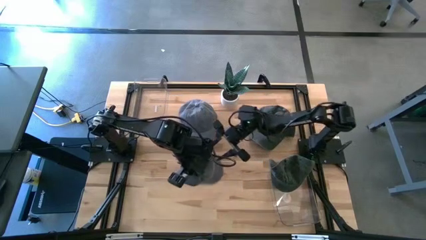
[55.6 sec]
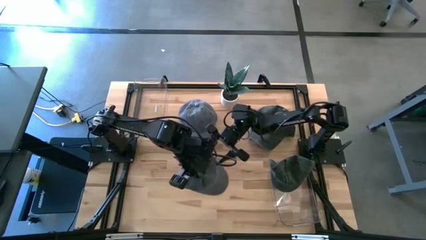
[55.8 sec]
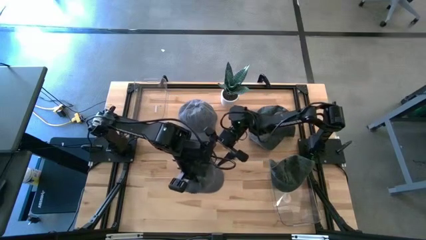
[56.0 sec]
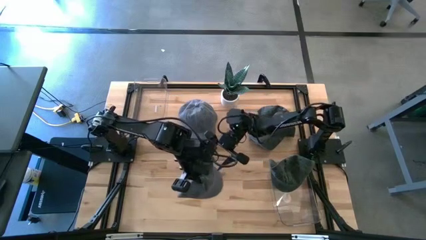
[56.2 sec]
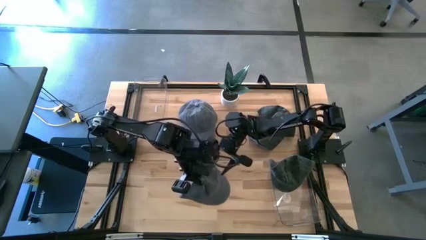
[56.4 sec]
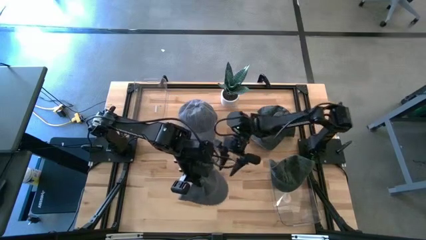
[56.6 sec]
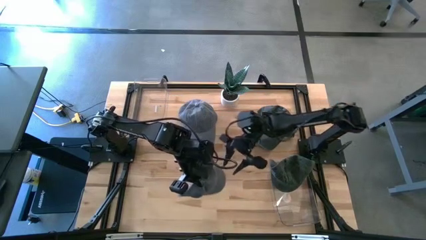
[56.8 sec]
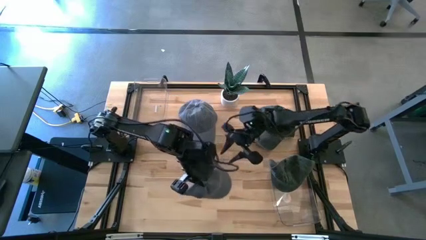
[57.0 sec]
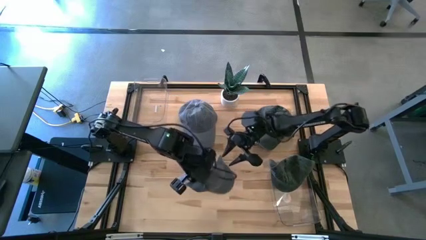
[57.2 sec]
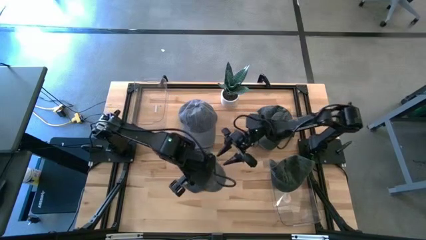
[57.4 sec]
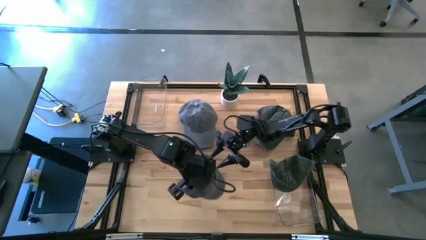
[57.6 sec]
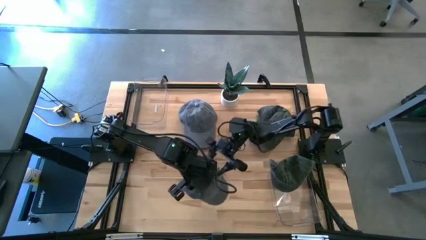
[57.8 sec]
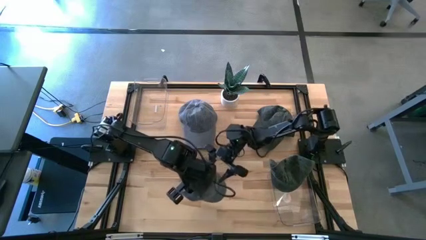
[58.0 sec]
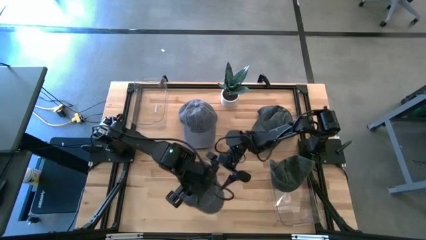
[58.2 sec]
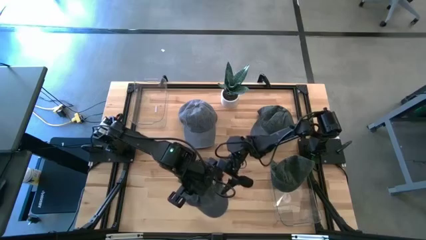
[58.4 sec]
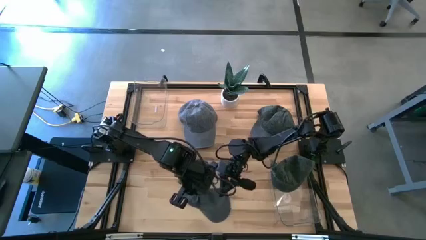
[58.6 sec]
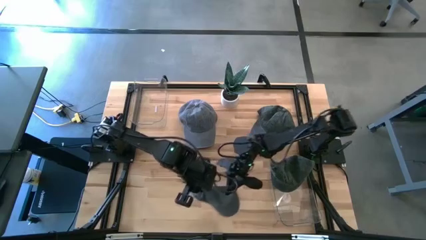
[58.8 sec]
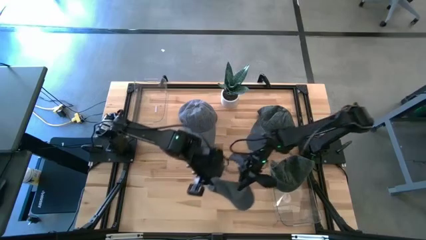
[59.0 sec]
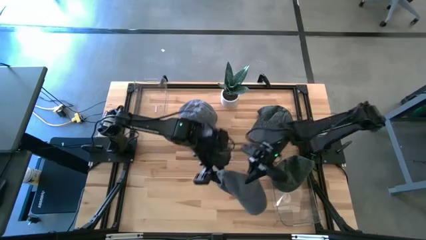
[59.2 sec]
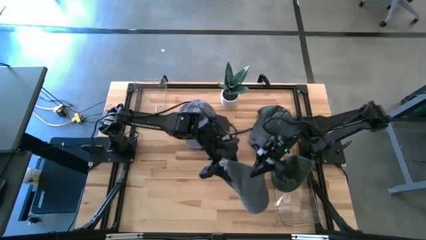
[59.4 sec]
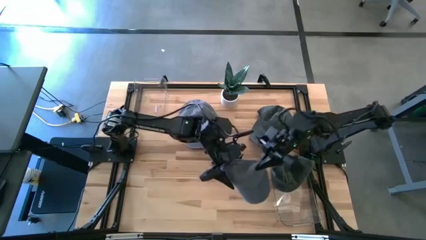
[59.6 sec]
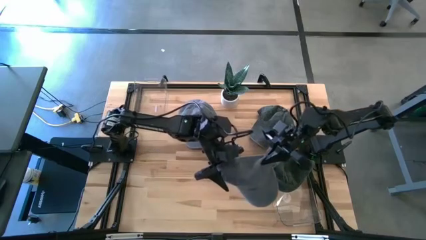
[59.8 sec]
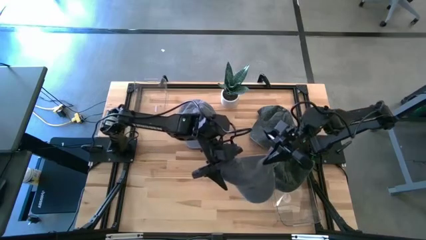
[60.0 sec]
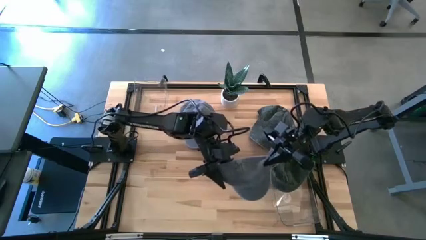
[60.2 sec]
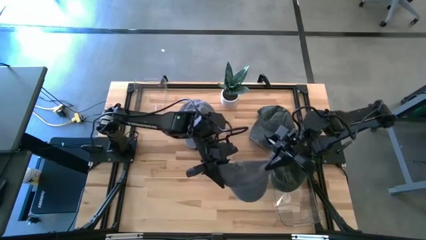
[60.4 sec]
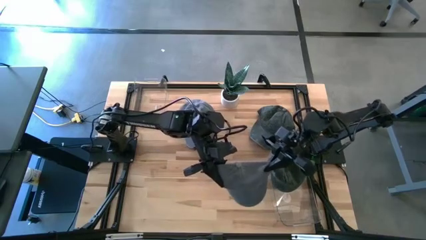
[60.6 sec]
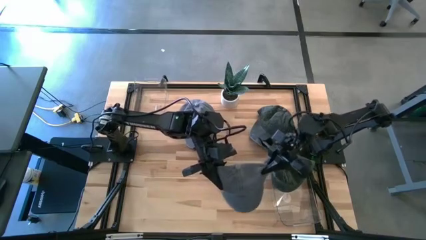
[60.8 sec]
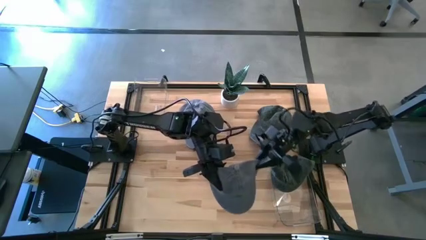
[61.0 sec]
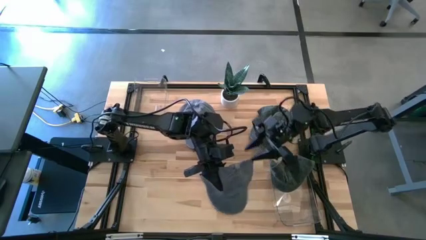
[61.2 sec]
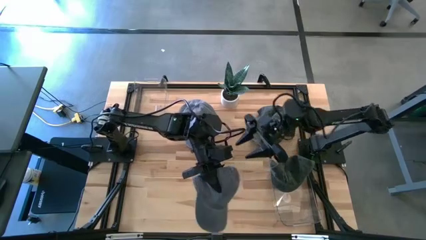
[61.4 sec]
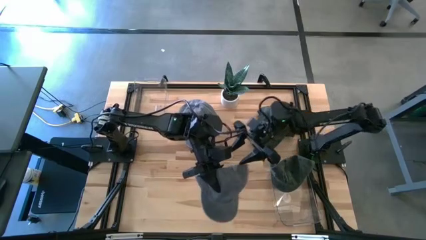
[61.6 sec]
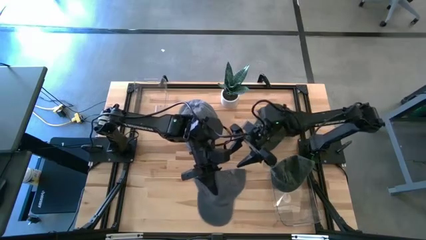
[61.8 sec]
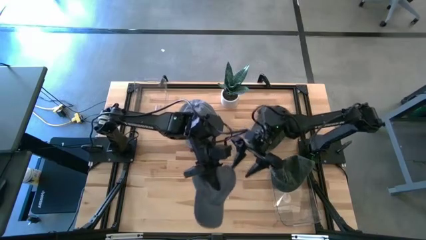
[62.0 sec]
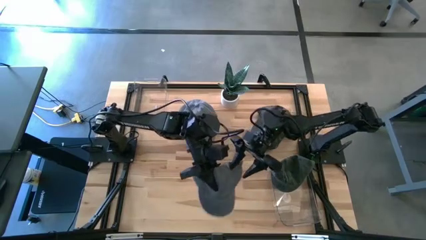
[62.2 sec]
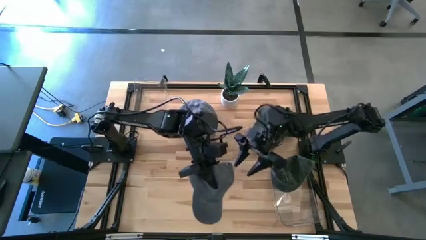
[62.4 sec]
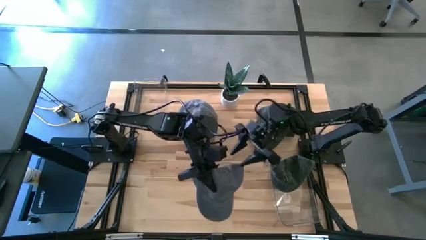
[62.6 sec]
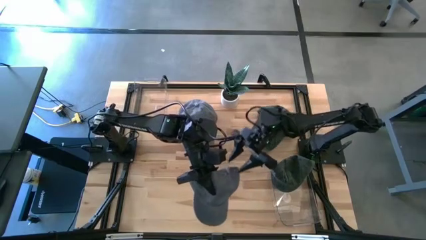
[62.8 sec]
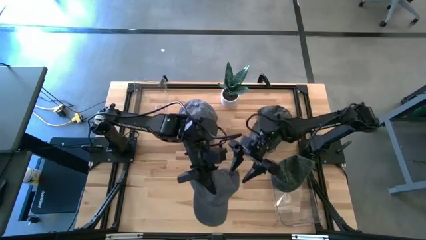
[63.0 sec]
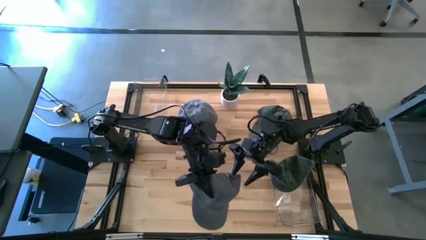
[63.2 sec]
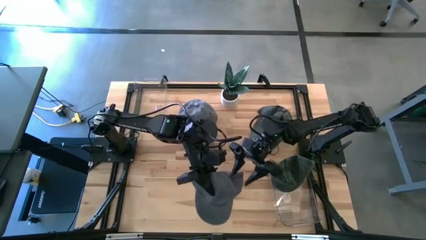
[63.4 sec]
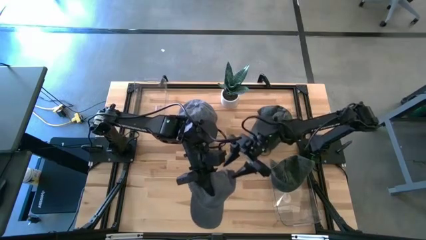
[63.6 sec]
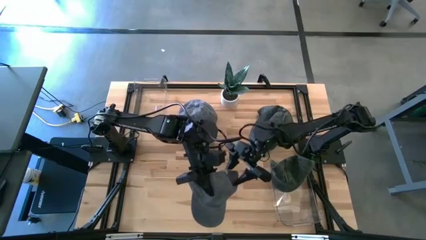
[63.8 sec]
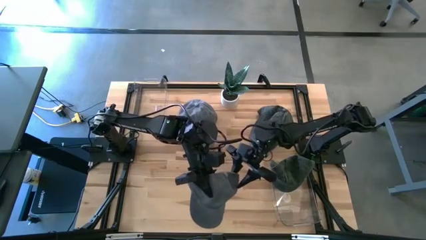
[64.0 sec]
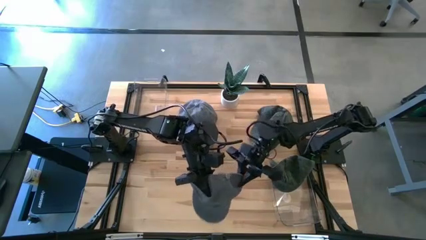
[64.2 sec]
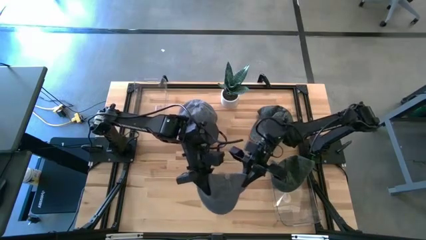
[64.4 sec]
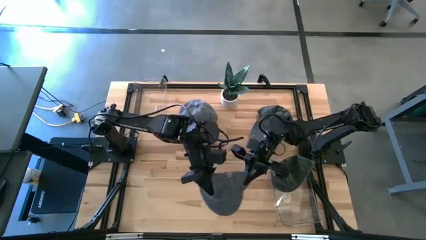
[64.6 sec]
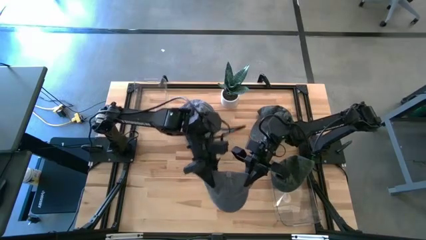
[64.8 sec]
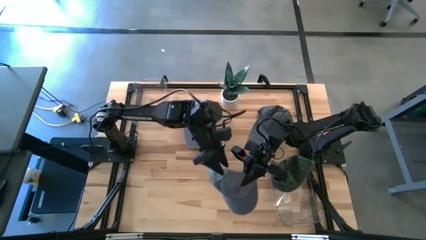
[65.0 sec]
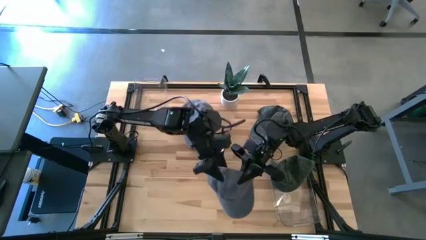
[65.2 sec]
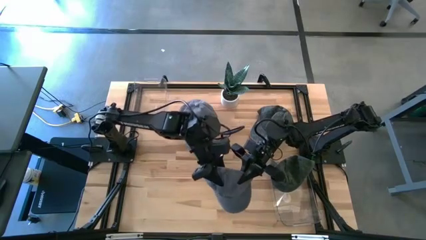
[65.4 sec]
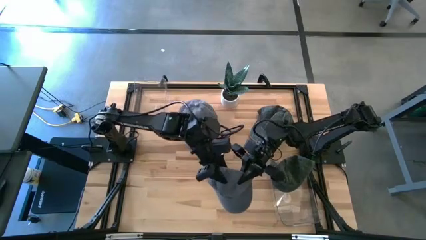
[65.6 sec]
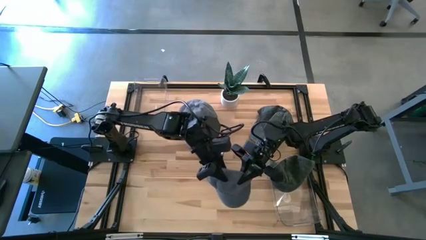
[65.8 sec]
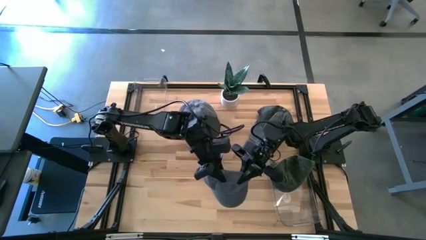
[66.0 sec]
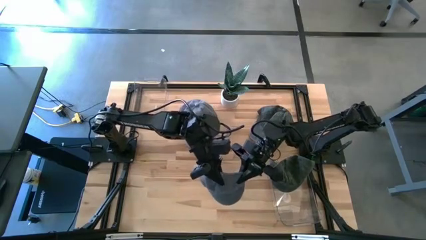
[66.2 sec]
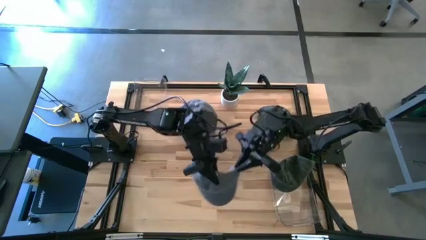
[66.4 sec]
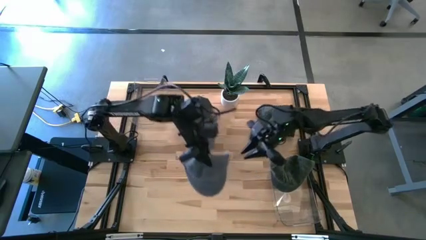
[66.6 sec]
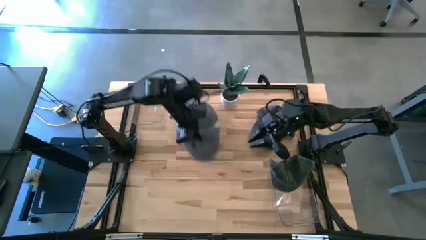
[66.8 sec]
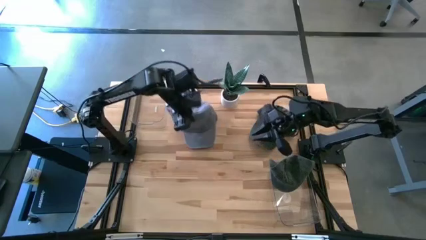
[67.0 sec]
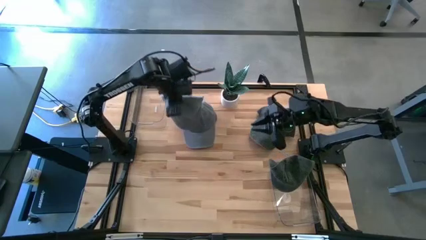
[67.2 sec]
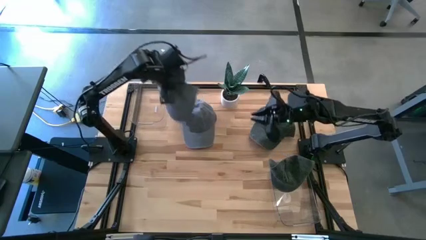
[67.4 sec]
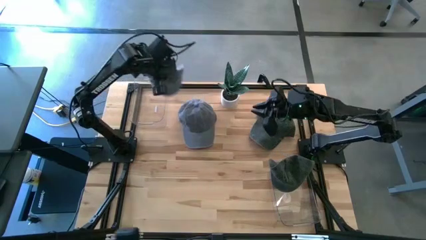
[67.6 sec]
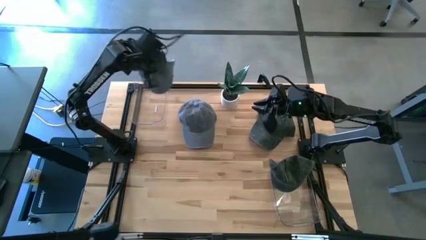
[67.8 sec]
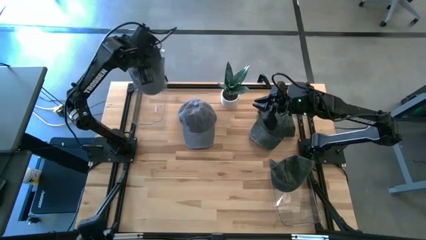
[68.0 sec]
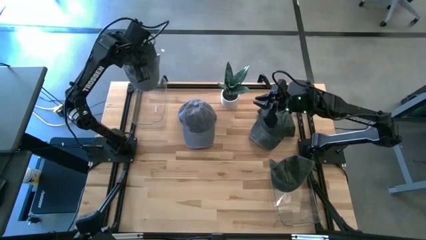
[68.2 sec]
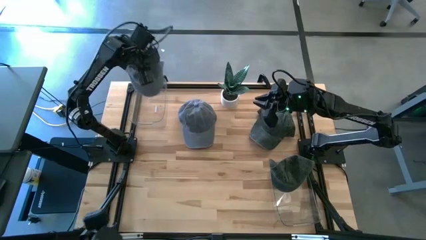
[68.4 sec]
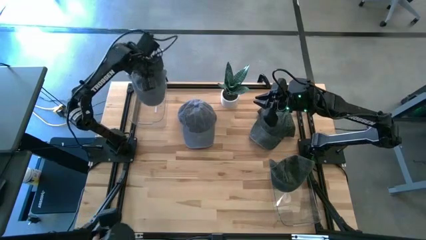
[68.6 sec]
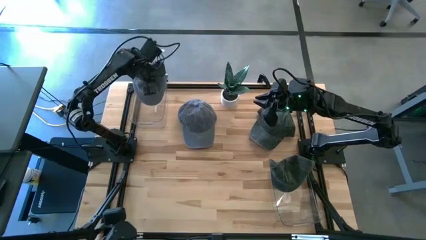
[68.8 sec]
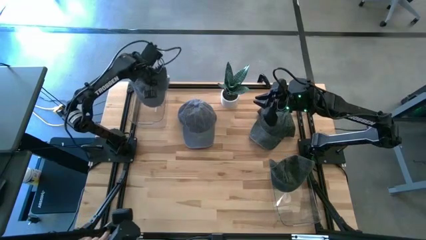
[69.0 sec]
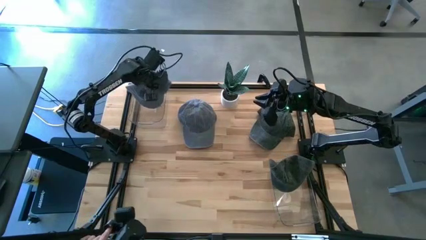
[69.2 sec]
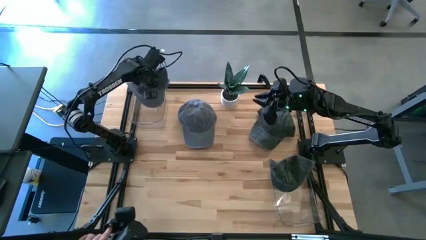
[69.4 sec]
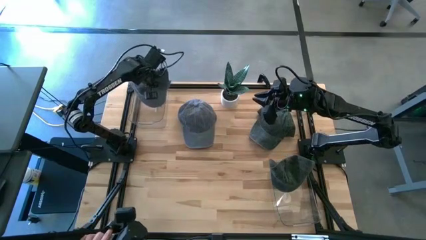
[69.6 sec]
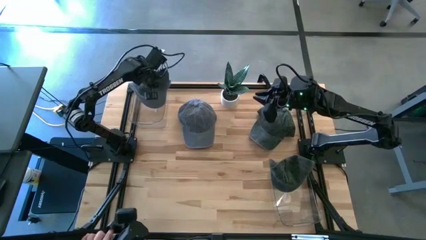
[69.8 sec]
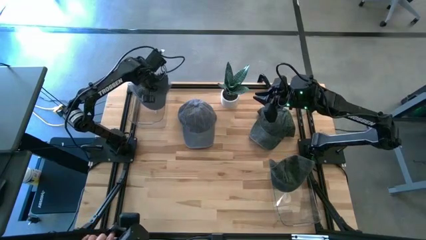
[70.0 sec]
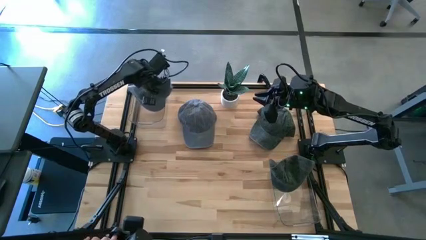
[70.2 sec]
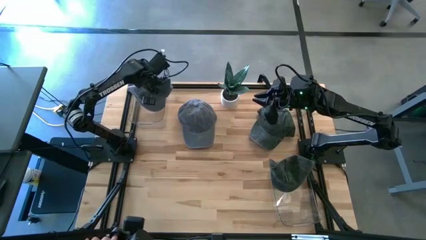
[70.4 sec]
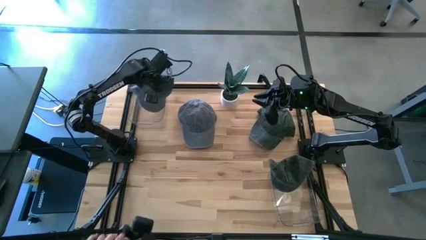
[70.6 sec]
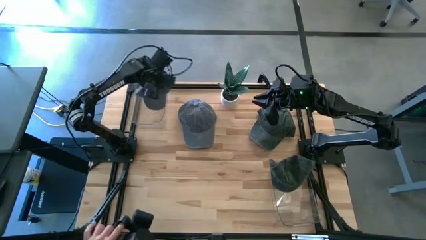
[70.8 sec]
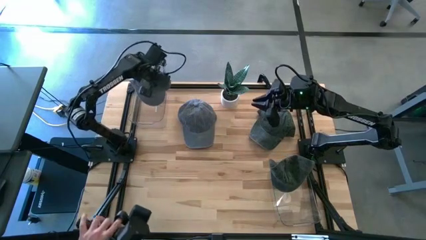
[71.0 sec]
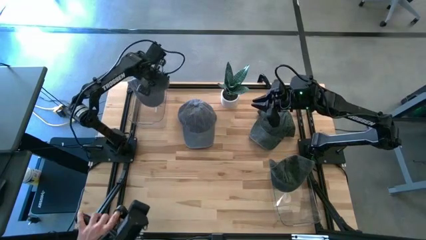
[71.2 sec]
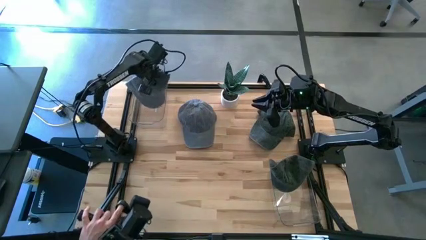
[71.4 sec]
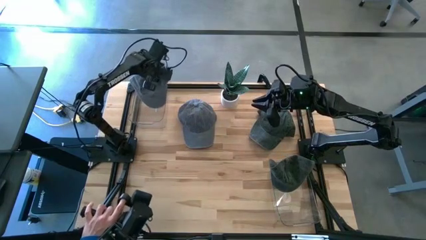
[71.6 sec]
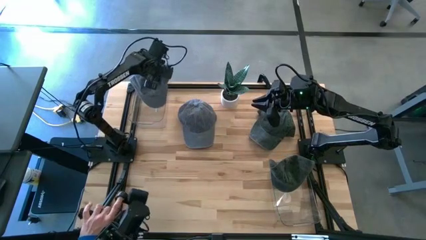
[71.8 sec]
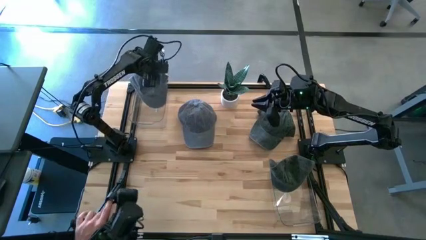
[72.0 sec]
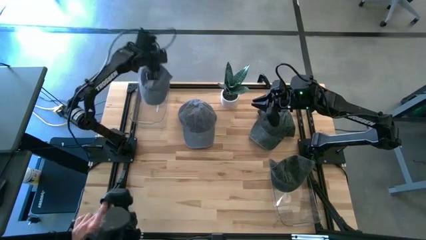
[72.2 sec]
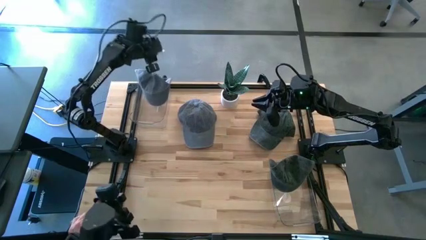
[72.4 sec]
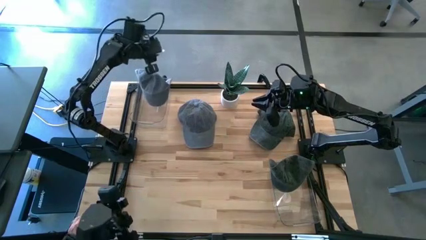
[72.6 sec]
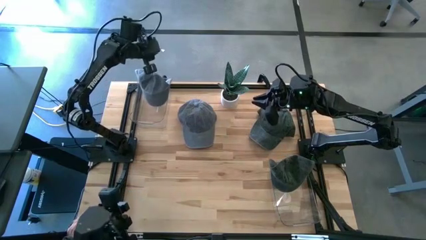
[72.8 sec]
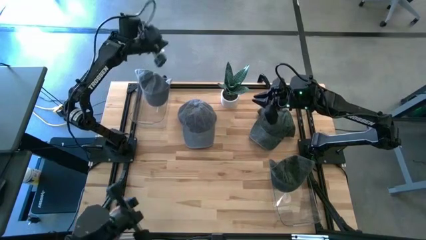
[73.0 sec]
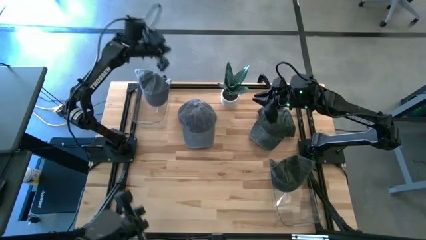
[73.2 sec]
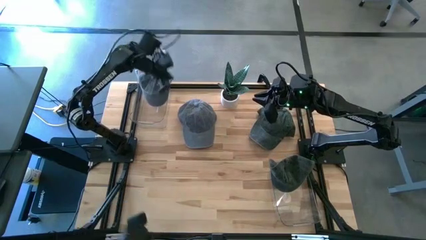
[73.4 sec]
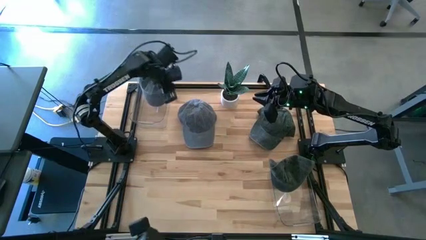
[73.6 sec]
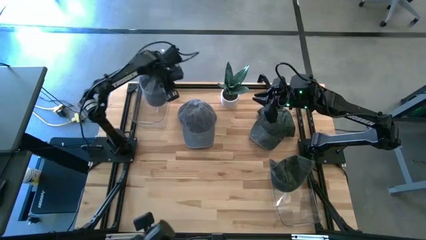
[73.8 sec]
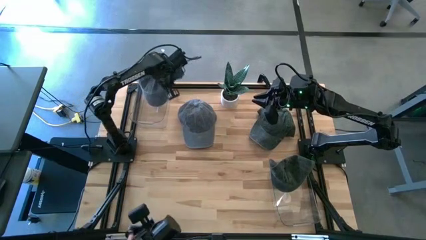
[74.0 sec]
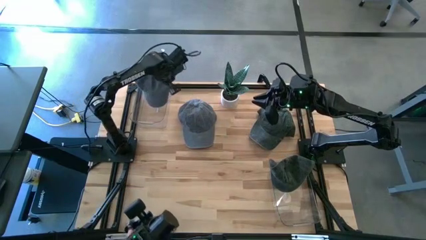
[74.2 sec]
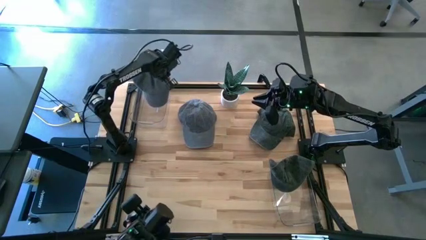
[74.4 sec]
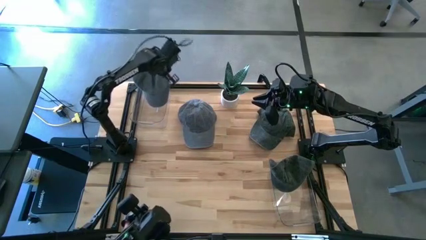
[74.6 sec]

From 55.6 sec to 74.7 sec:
Task: Pick & Place hat
Put the bottom gray cap into the top transparent bin
